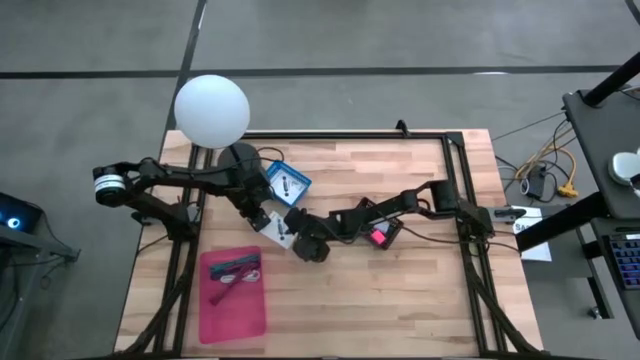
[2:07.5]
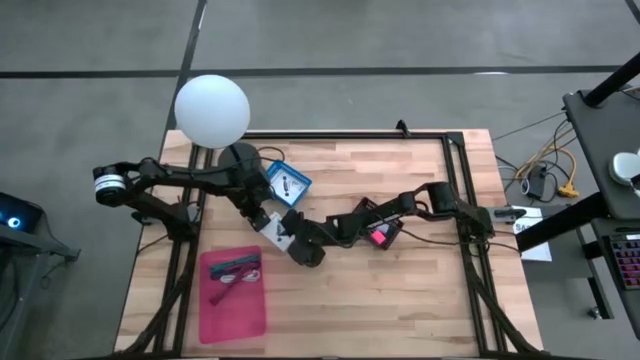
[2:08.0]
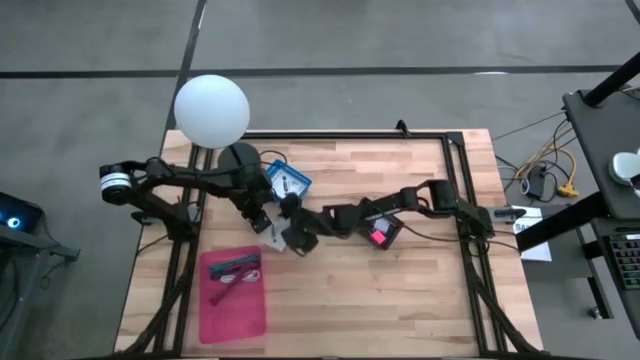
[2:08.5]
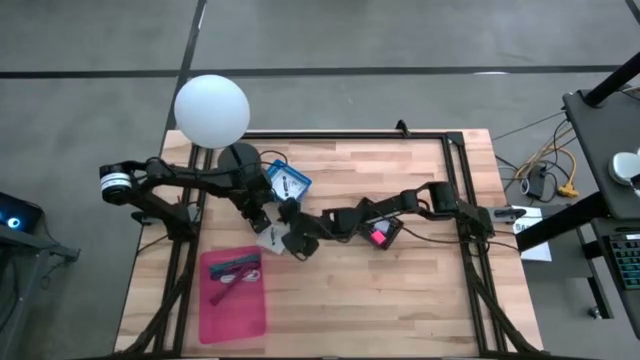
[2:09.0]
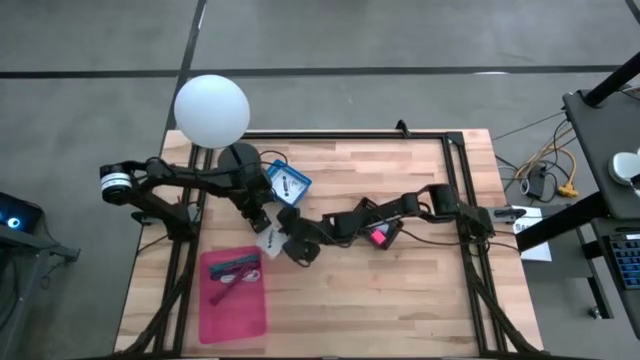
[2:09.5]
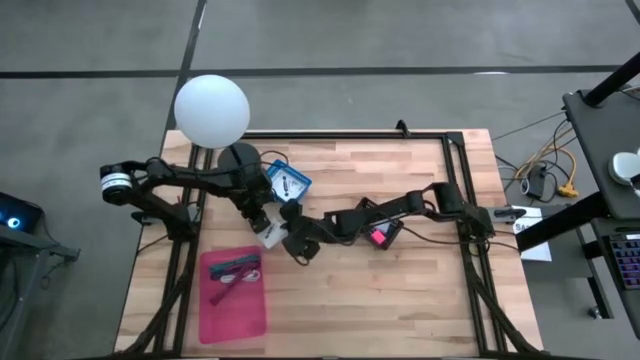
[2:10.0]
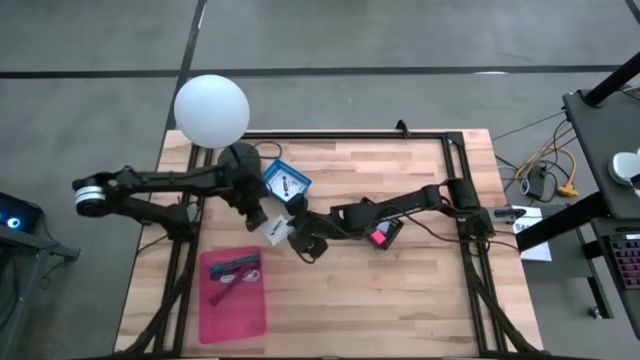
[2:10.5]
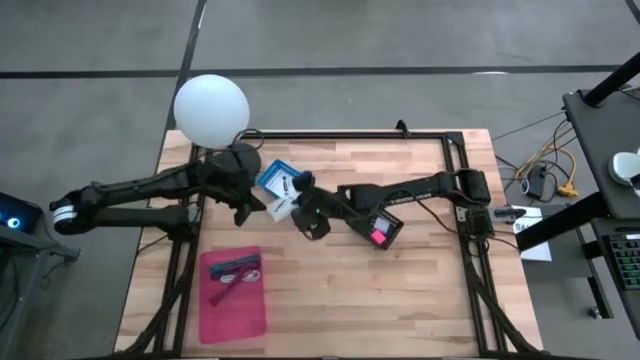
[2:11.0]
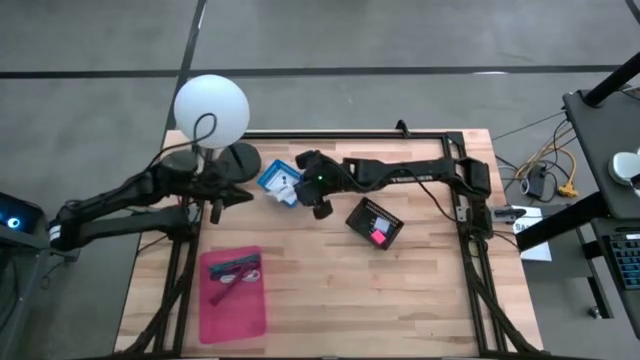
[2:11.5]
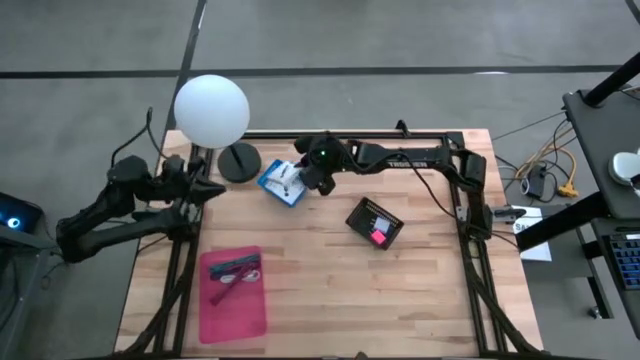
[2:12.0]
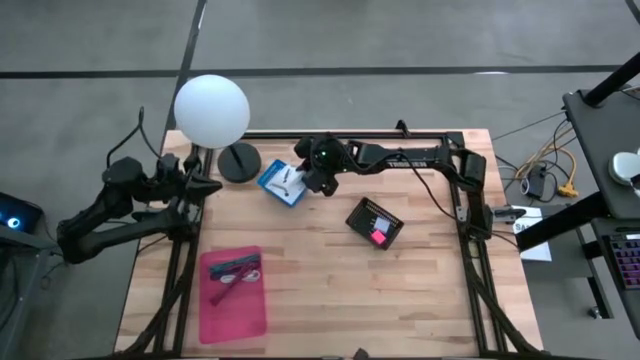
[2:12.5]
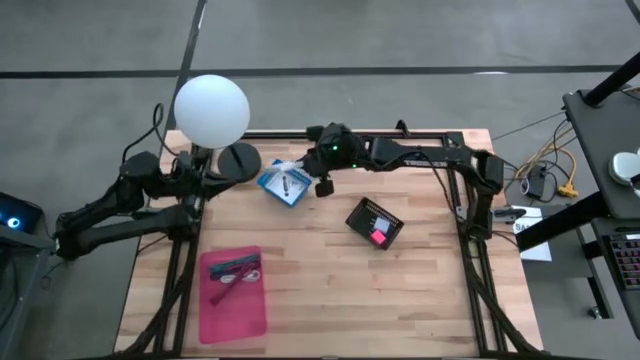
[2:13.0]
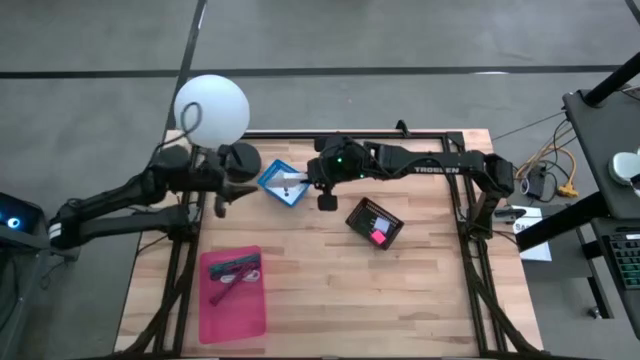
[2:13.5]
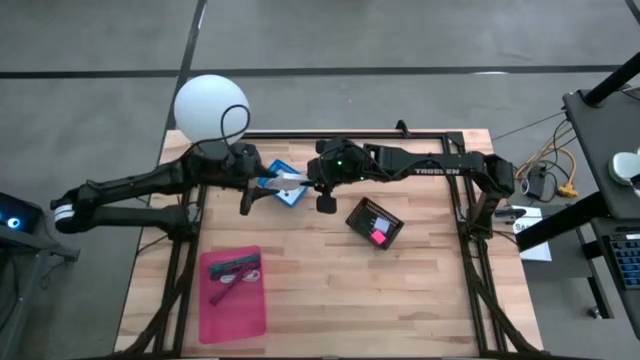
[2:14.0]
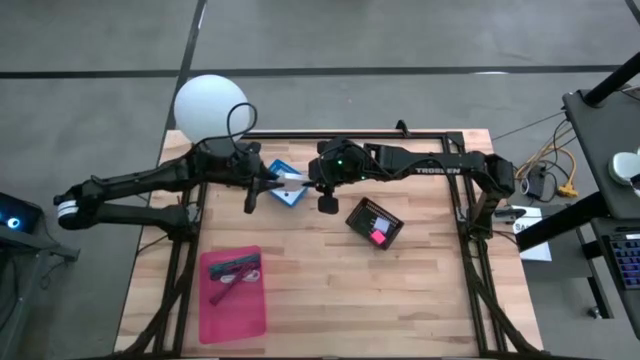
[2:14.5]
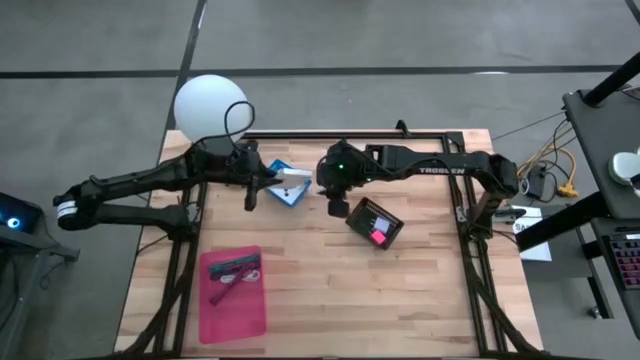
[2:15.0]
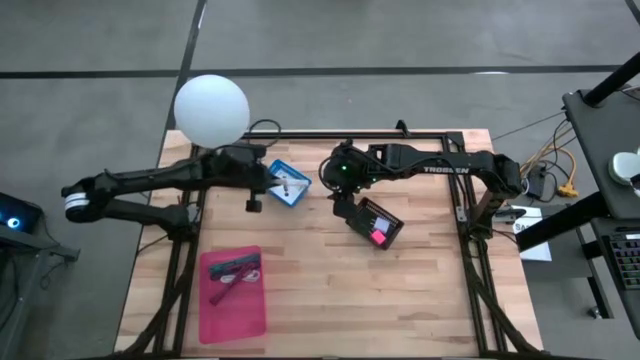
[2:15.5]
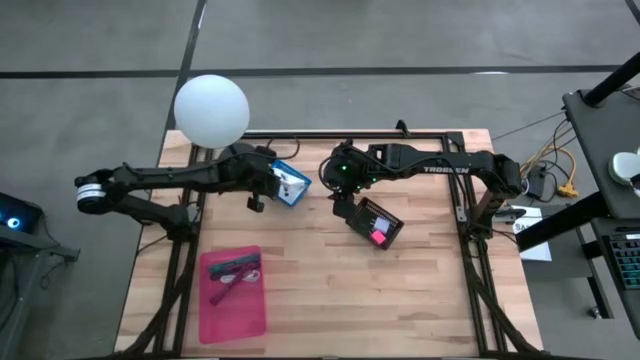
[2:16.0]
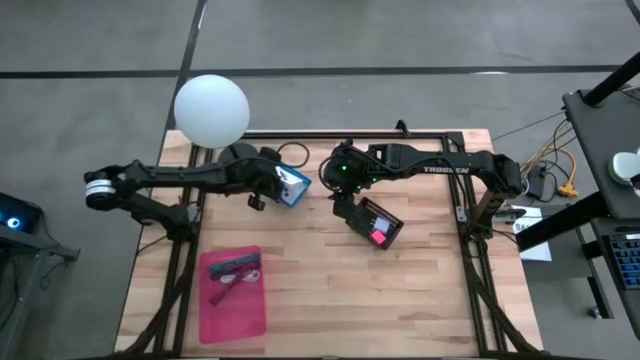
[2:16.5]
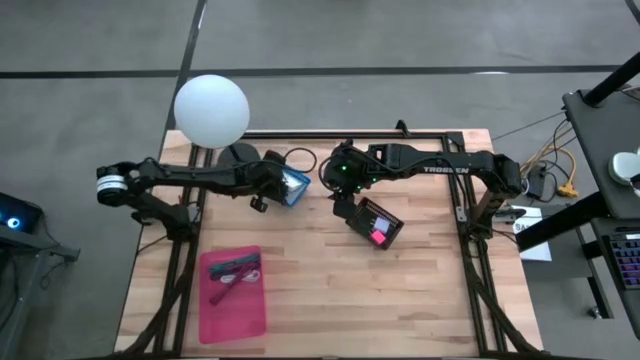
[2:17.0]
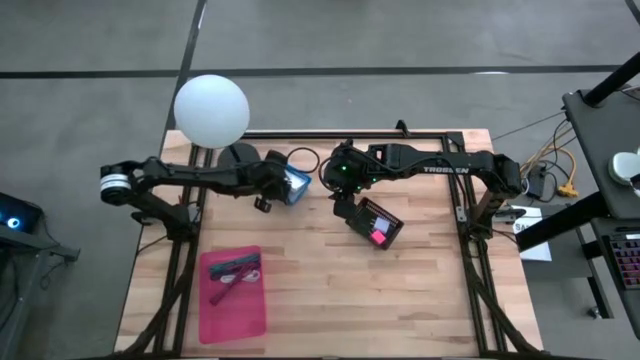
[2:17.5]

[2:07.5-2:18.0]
Task: Pick and place items into bin
Put the white card reader box into the blue bin

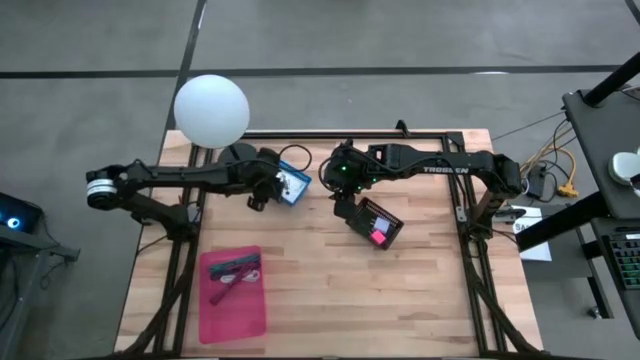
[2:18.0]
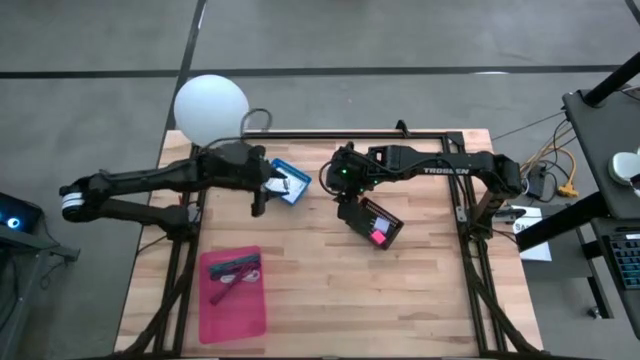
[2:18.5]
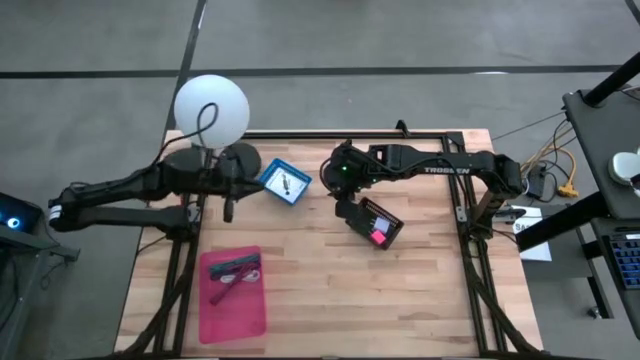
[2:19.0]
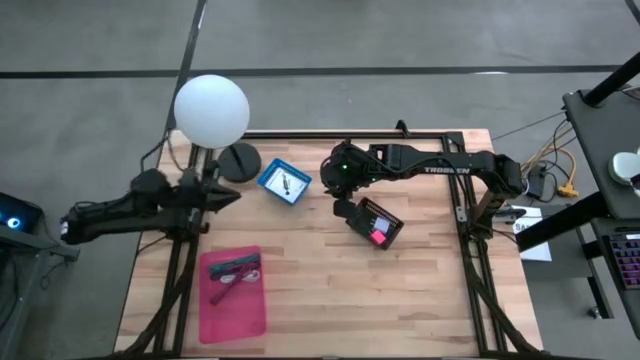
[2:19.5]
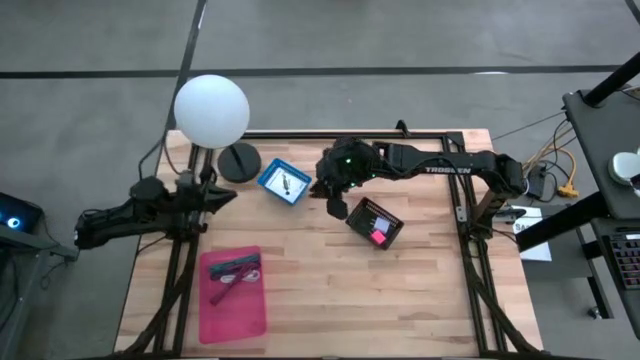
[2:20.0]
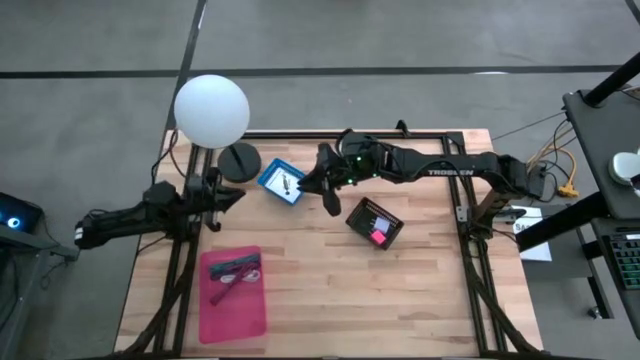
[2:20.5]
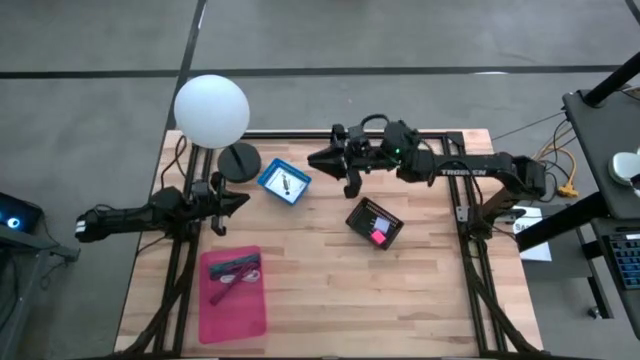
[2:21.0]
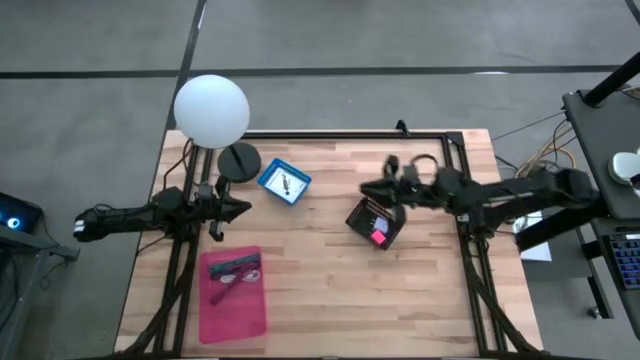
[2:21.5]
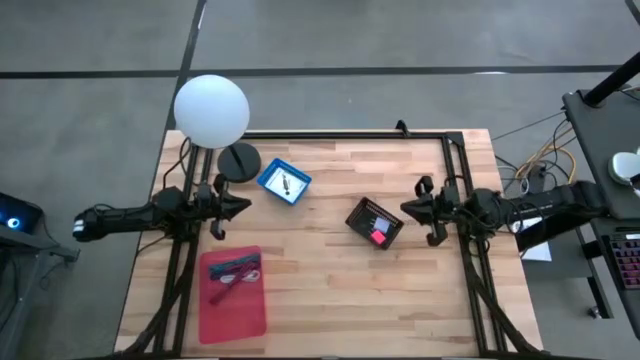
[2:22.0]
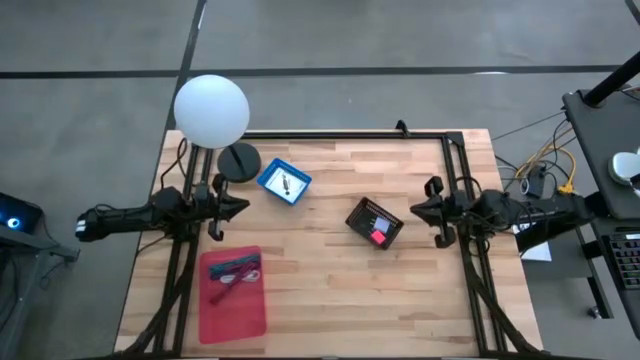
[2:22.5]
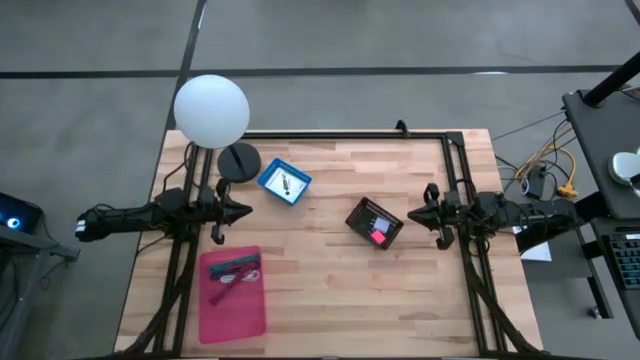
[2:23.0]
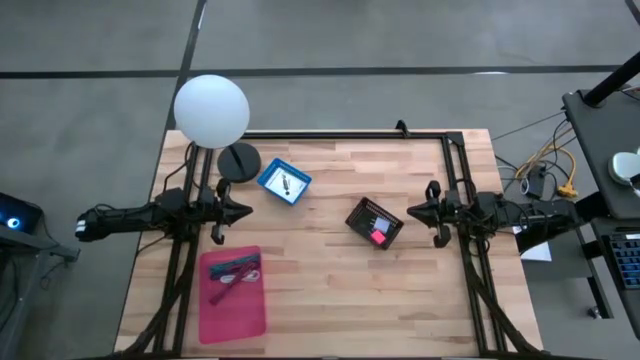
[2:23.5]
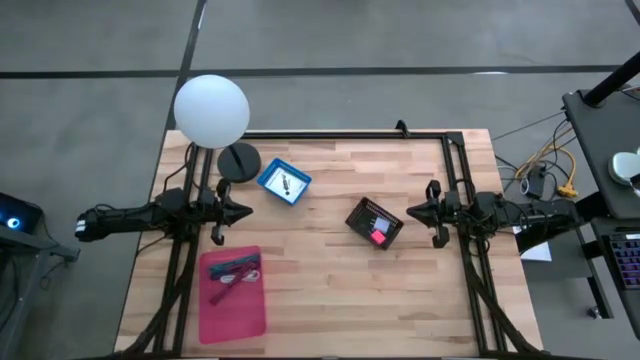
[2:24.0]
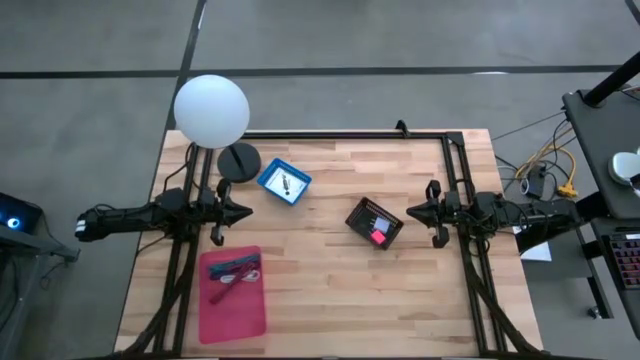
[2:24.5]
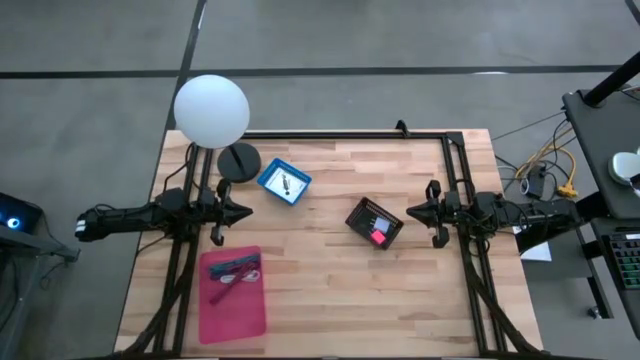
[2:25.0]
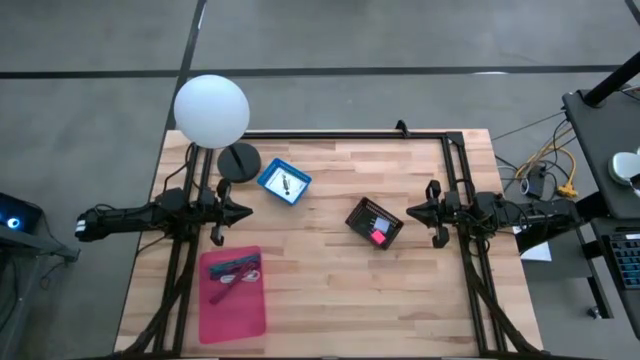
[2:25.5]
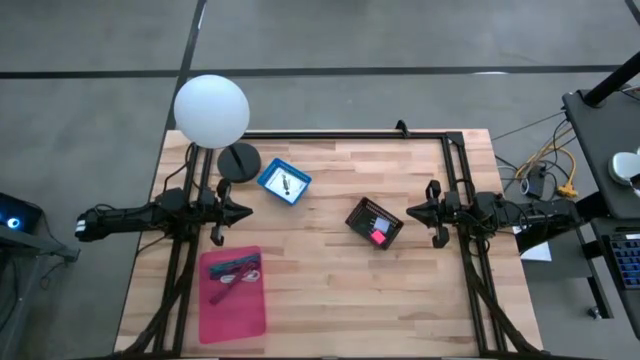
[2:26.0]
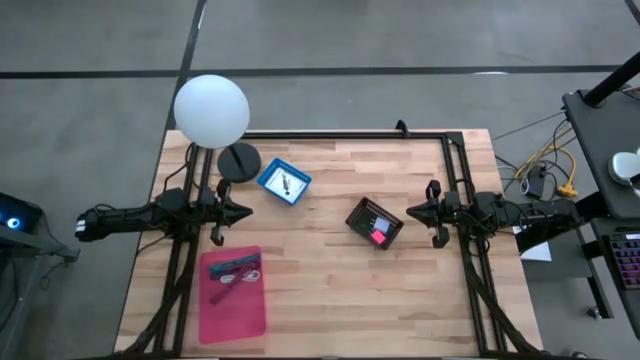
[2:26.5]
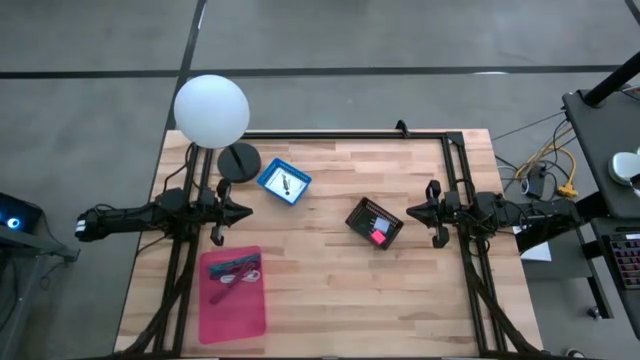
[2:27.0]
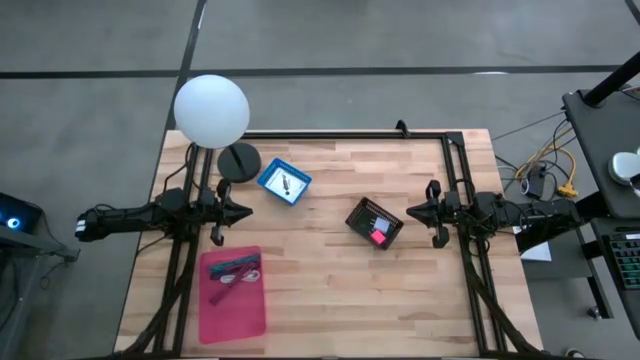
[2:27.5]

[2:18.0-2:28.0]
Return to Home Position
